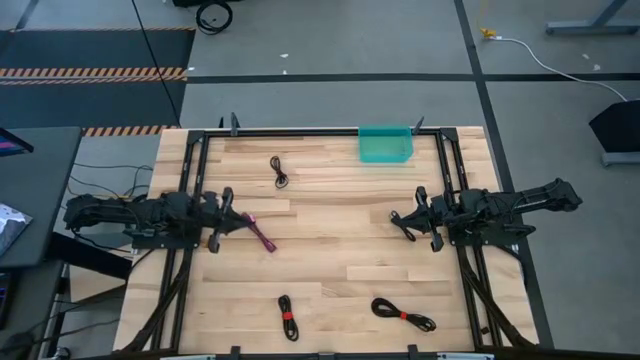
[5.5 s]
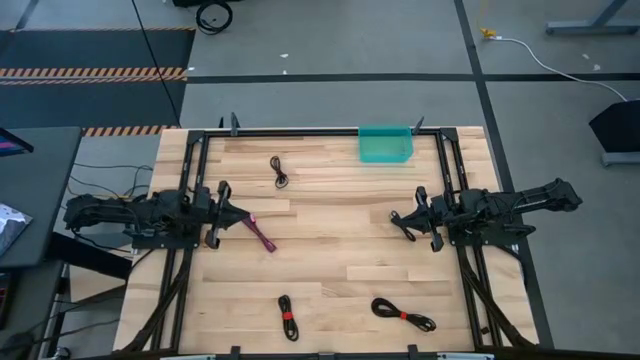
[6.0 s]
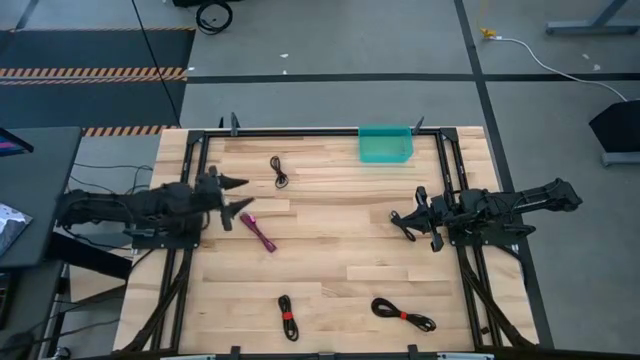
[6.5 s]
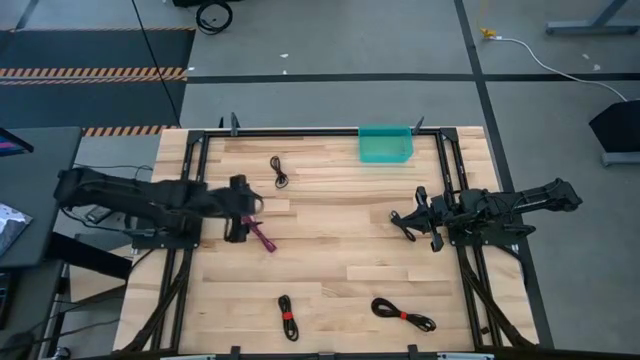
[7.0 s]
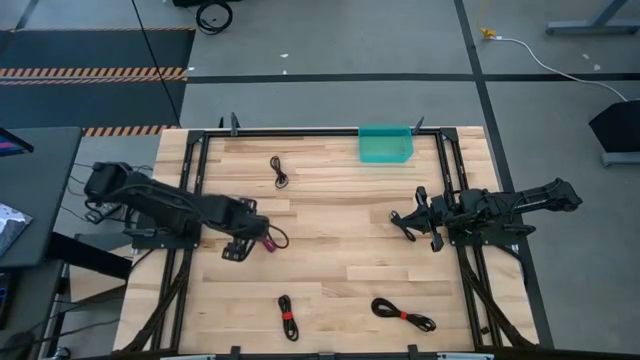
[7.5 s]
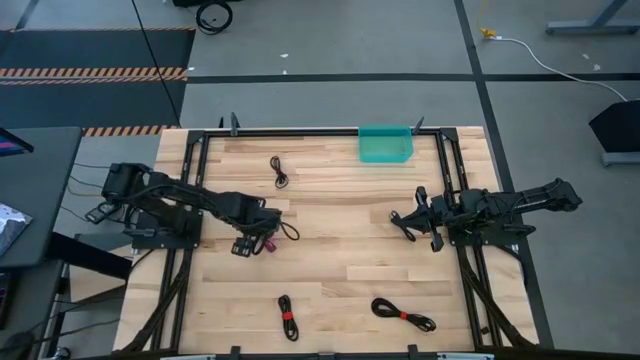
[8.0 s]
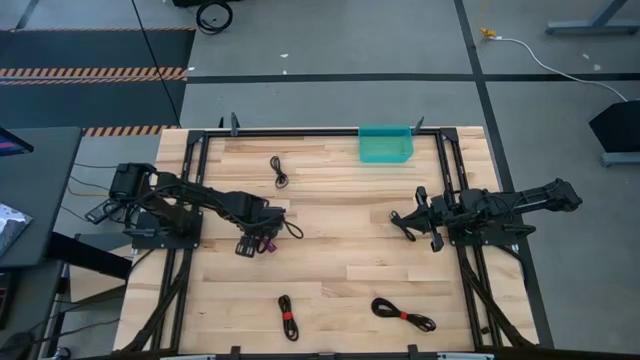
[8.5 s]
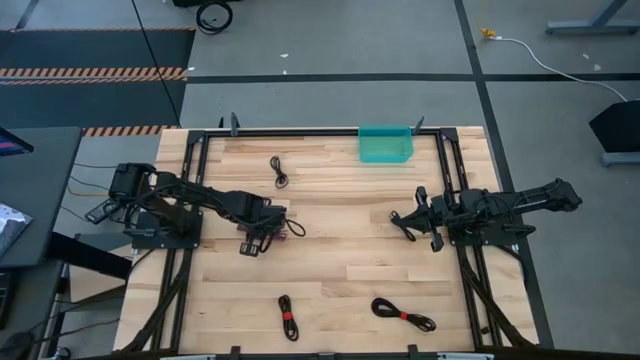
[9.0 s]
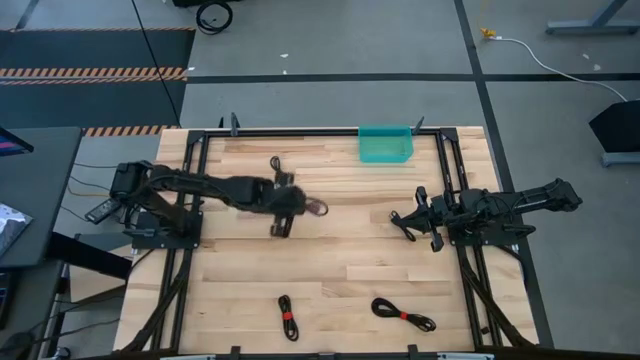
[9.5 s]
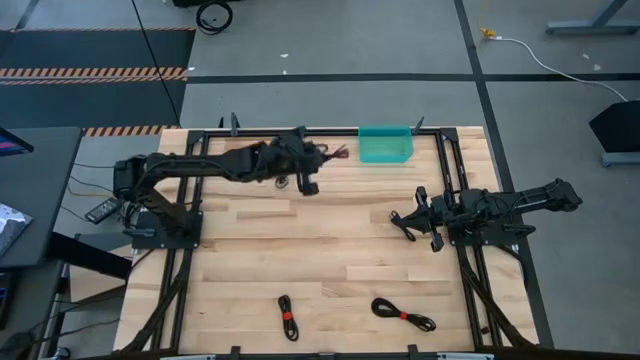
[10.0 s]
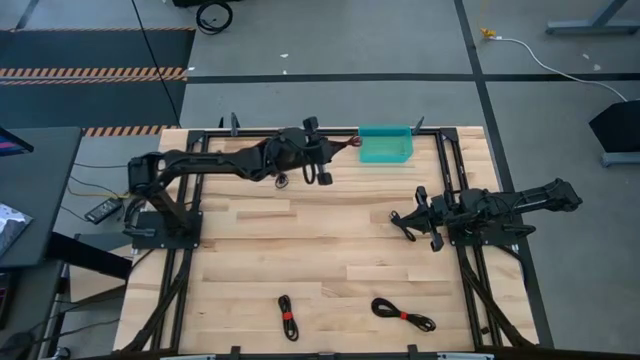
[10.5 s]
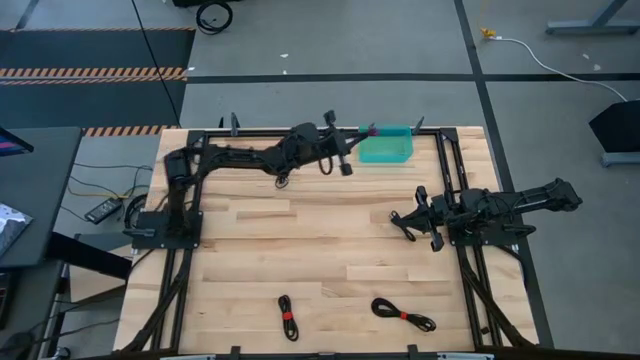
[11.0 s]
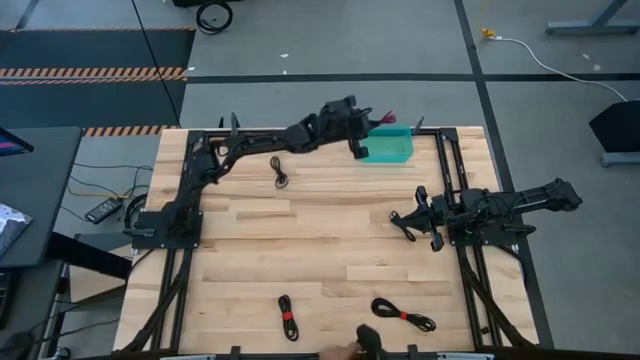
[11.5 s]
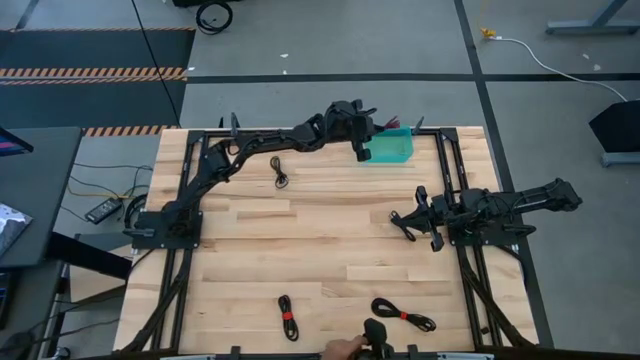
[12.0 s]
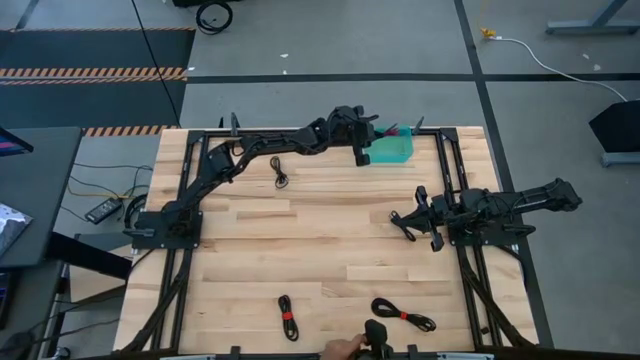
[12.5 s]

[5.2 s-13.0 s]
Task: Pick and place USB-C Cables
Put the pink usb cable into the bin

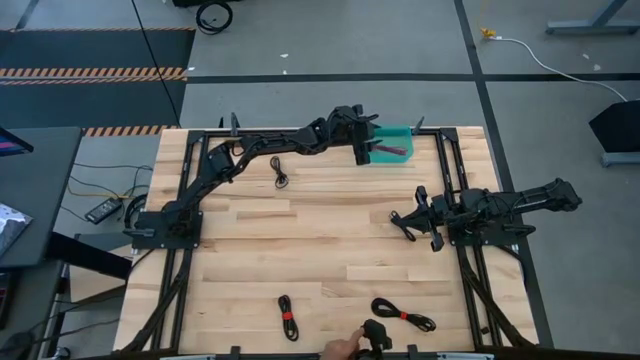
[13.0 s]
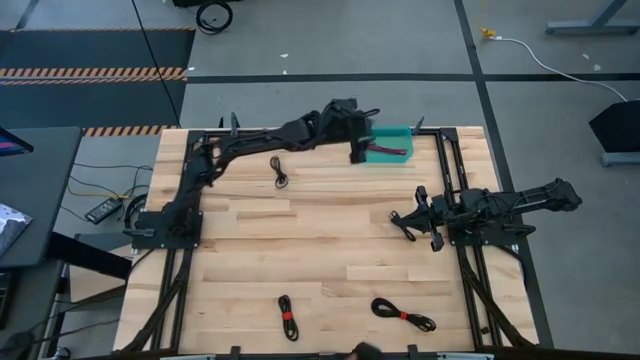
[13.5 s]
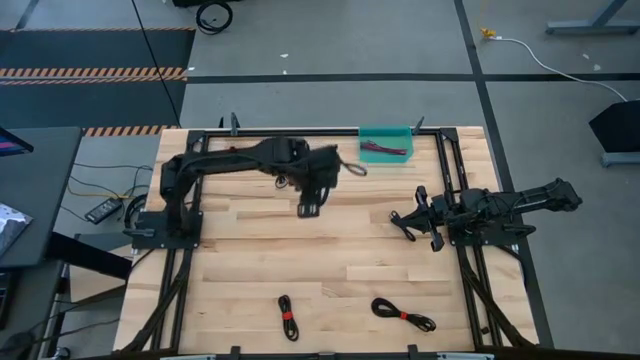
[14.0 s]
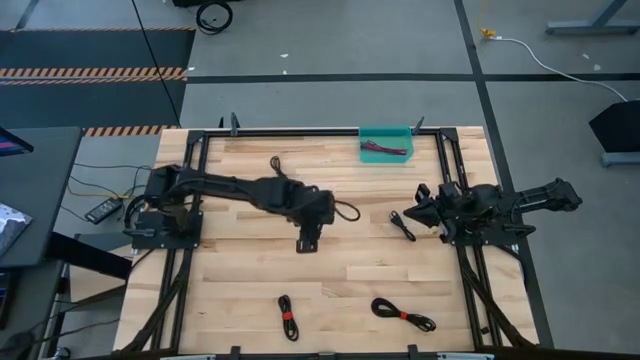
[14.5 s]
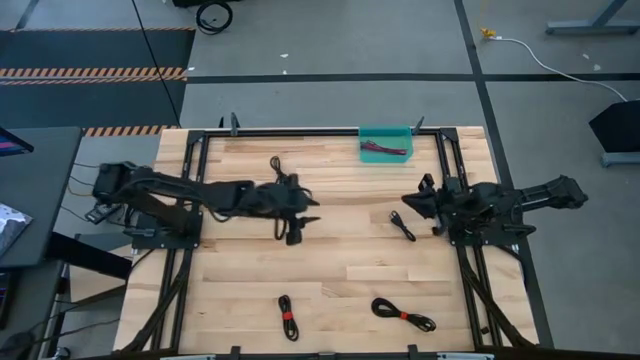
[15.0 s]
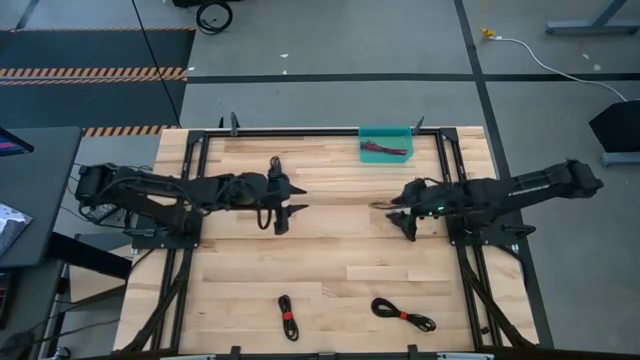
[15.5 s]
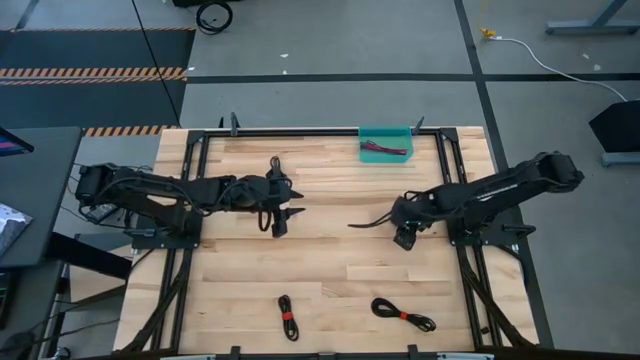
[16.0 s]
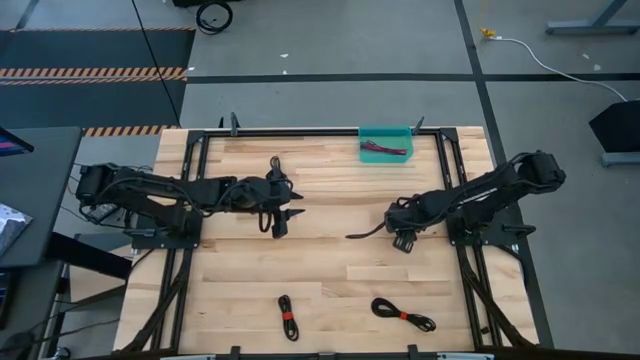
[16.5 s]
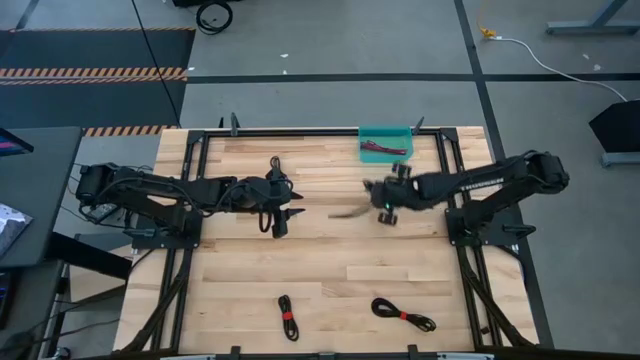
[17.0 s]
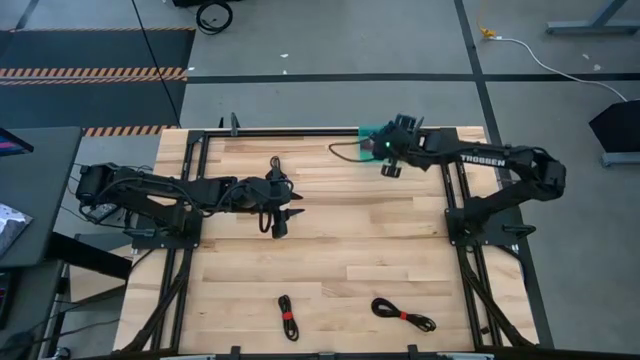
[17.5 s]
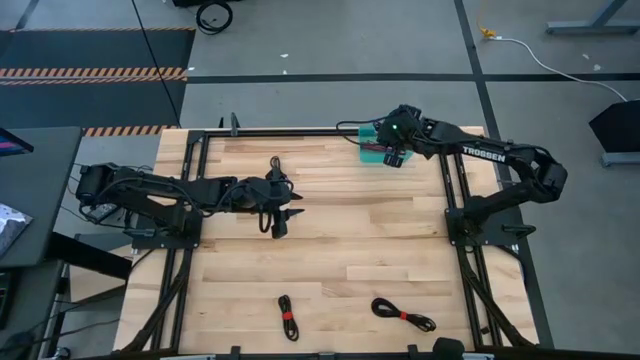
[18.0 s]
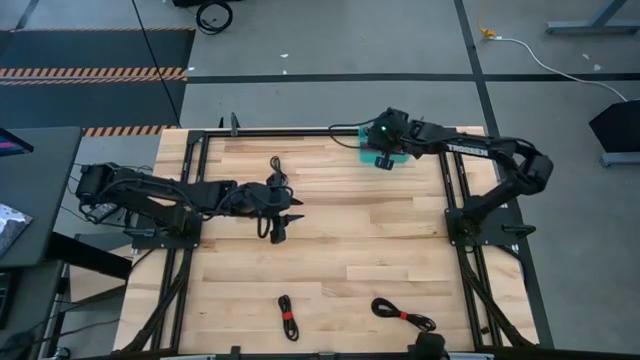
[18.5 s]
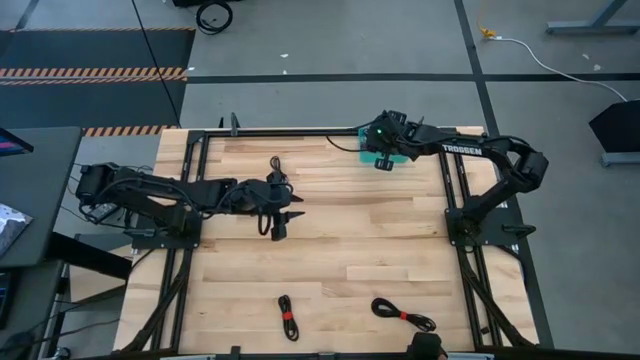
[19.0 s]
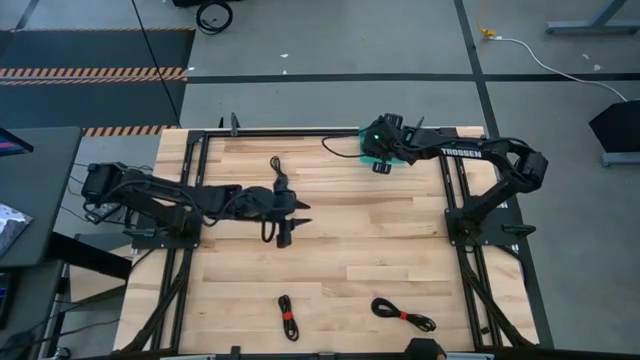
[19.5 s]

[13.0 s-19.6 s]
Put the top right black usb cable into the bin

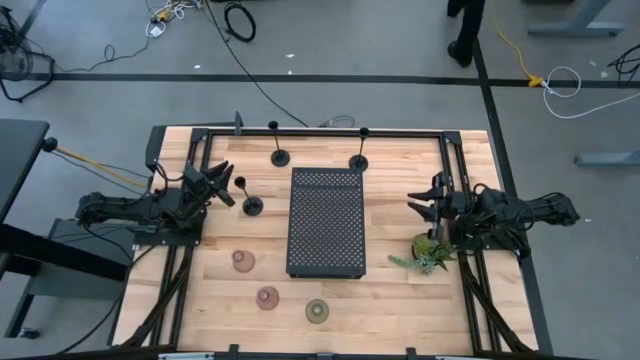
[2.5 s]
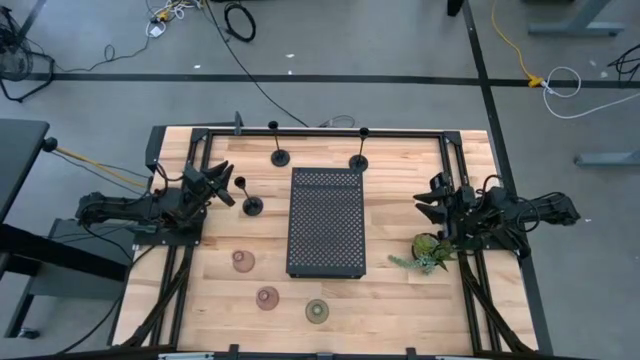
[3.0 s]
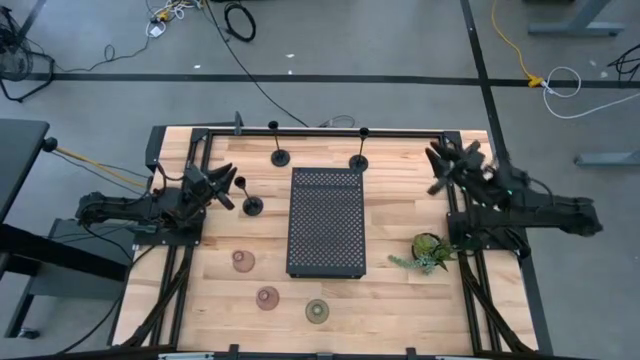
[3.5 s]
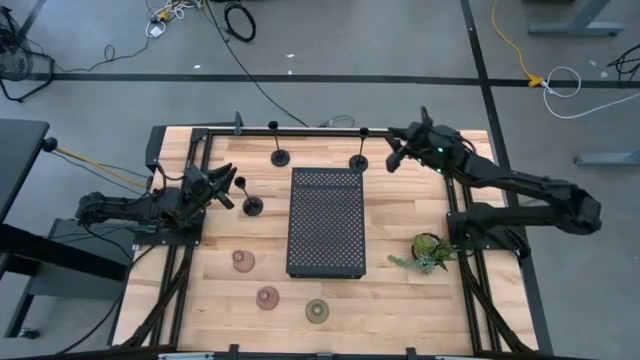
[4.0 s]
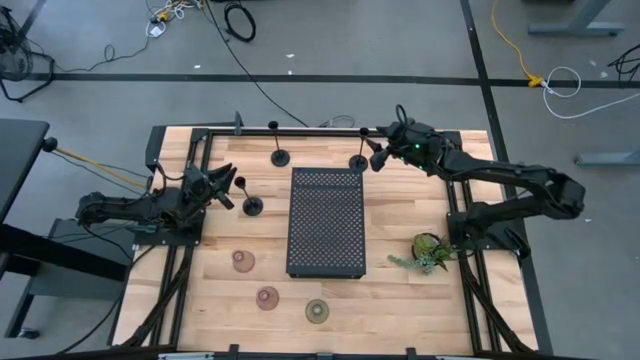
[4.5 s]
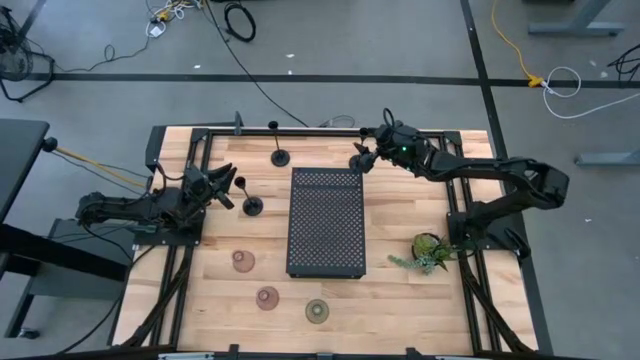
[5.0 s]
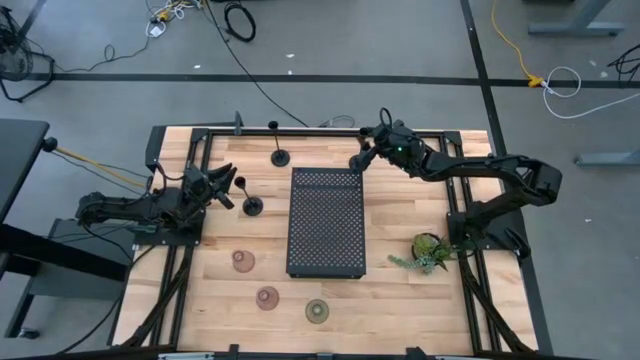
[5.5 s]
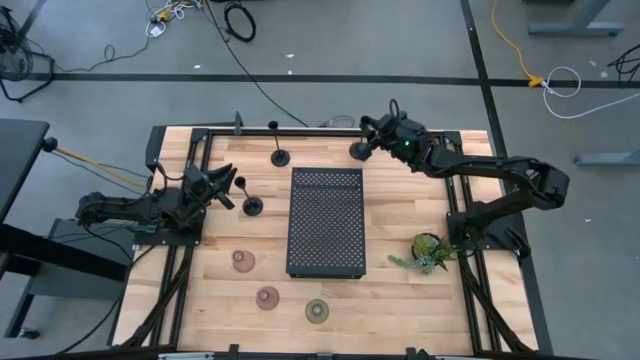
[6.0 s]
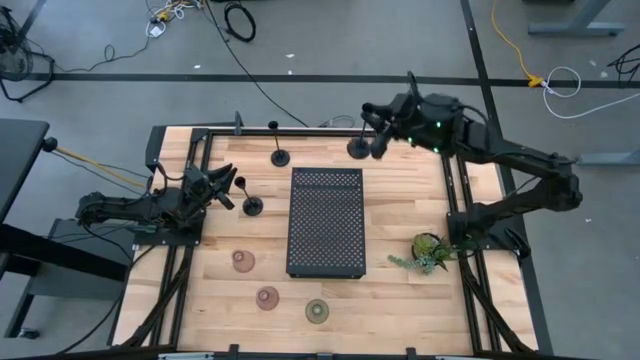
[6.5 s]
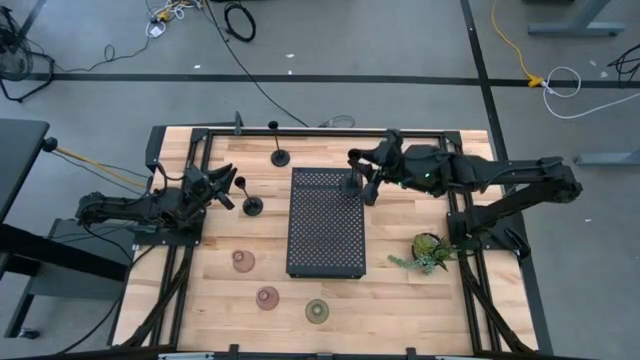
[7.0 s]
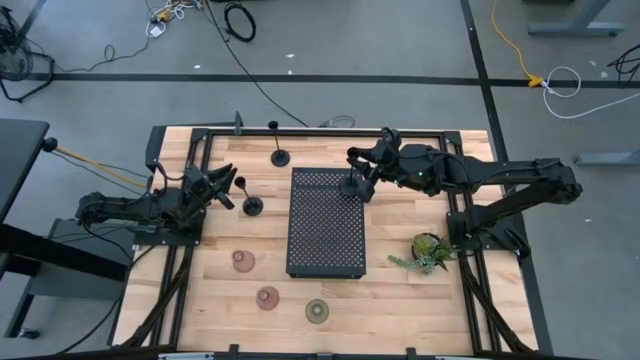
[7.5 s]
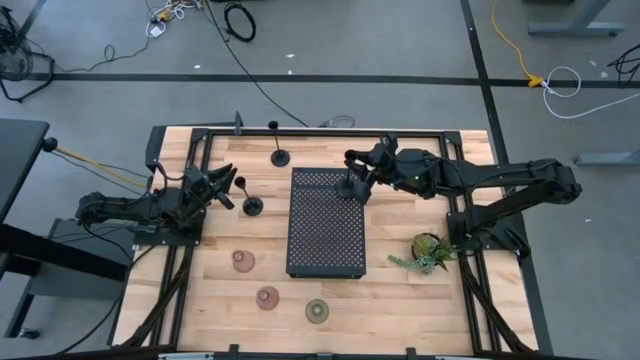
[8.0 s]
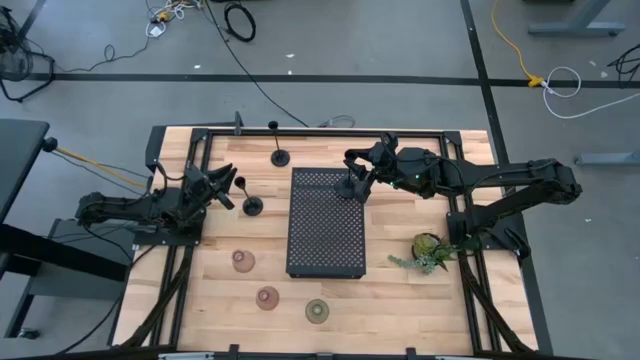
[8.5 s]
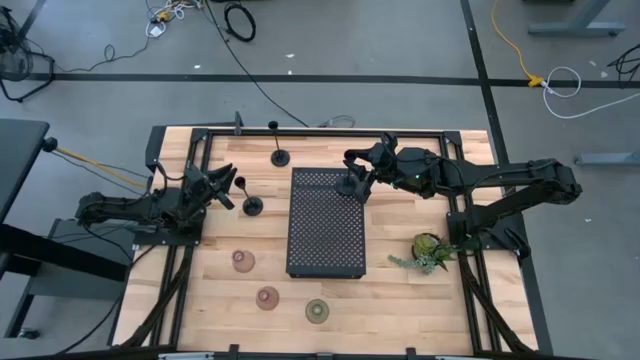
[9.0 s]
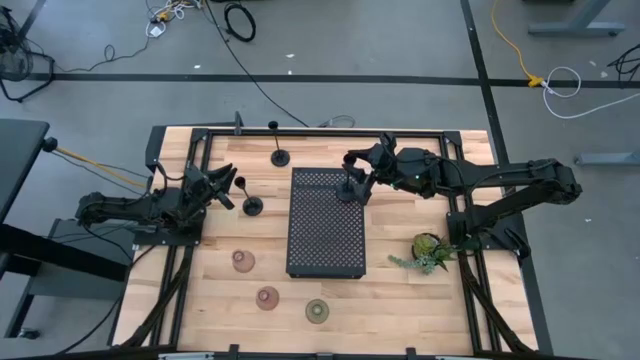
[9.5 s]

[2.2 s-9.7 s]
Task: Pick & Place candle stick holders
Put the top right black candle holder on the shelf
